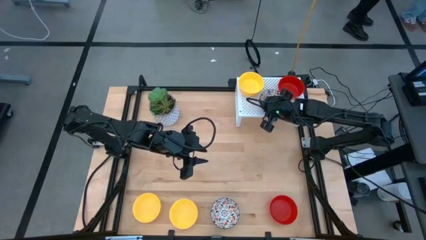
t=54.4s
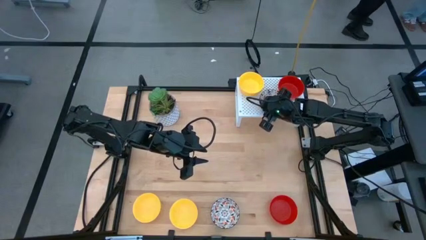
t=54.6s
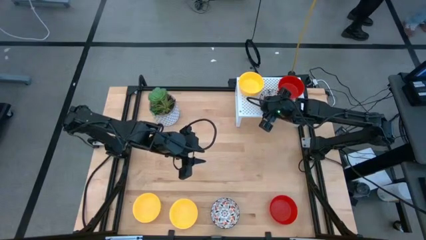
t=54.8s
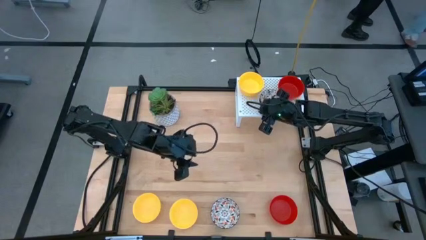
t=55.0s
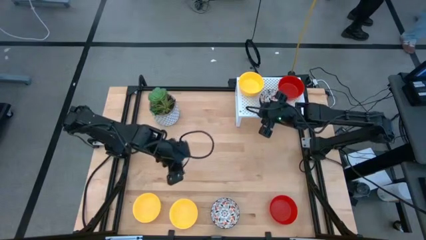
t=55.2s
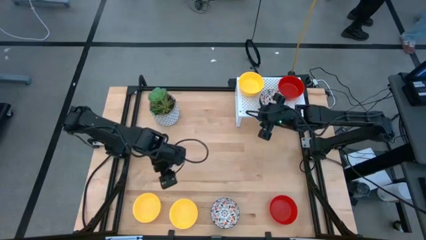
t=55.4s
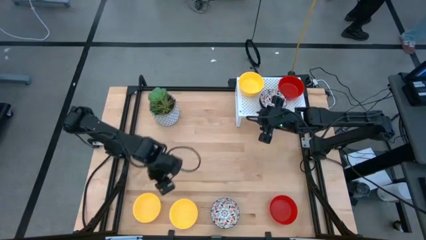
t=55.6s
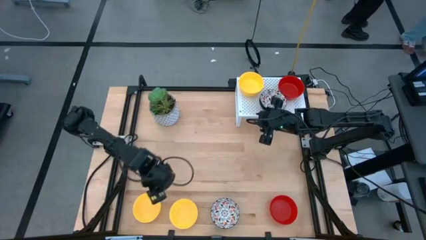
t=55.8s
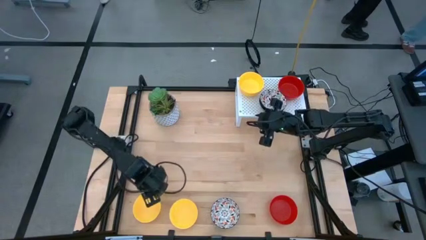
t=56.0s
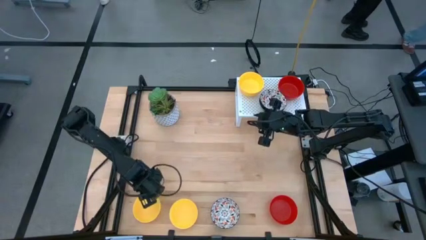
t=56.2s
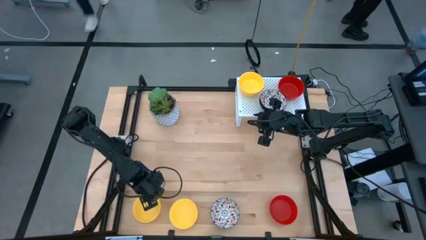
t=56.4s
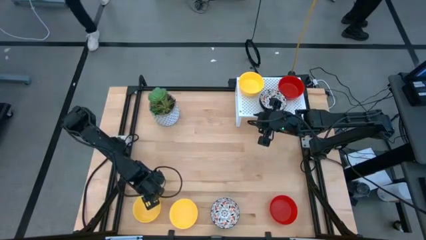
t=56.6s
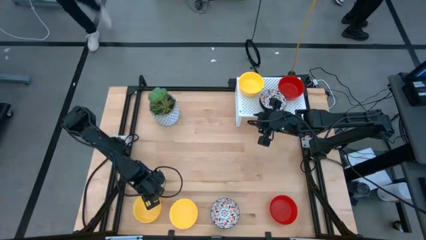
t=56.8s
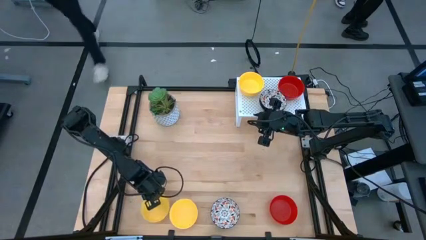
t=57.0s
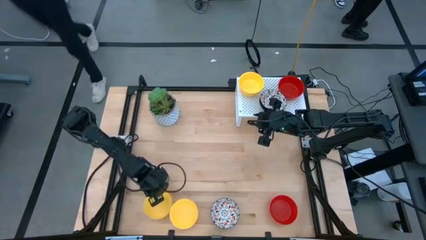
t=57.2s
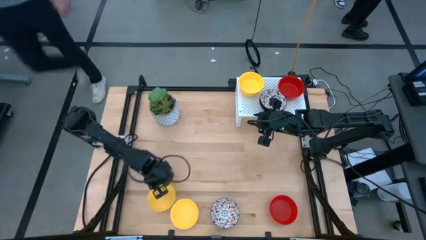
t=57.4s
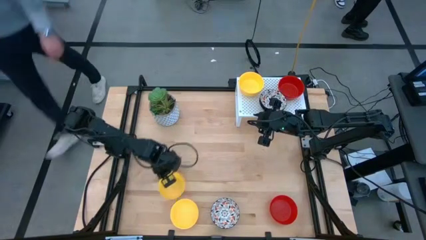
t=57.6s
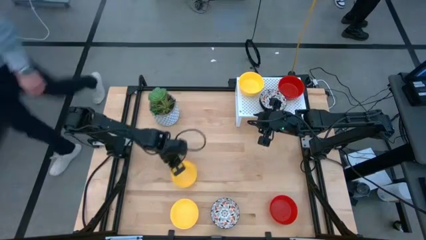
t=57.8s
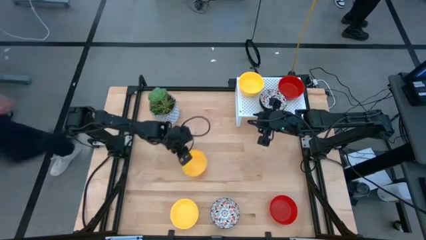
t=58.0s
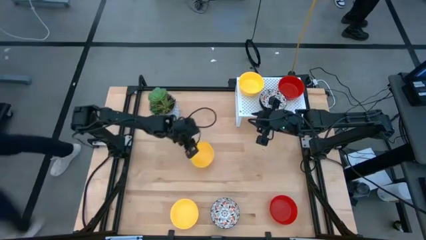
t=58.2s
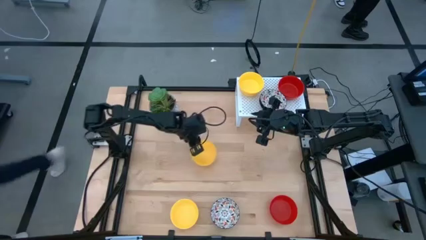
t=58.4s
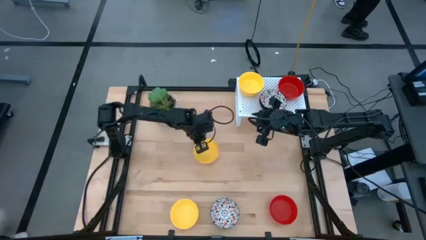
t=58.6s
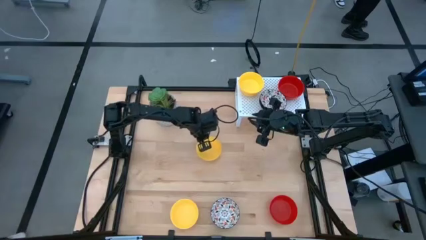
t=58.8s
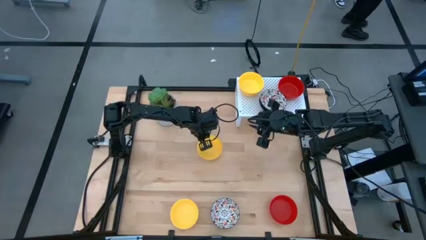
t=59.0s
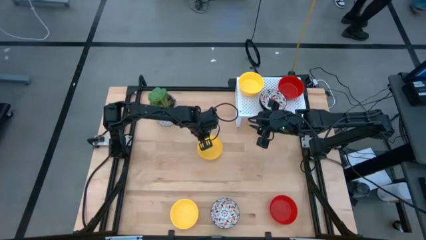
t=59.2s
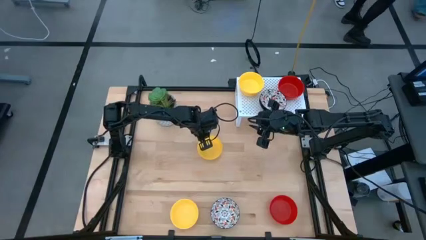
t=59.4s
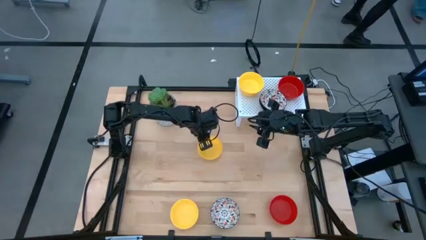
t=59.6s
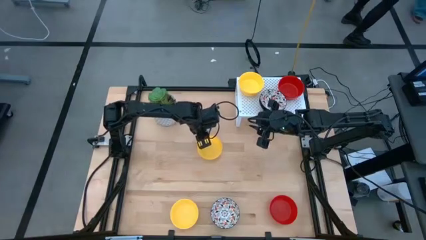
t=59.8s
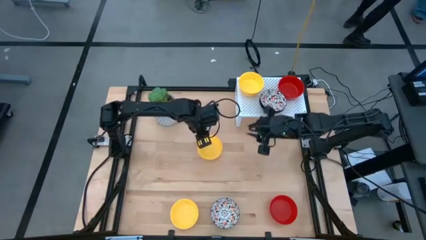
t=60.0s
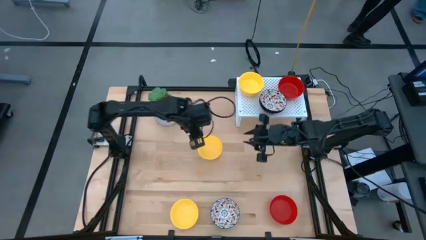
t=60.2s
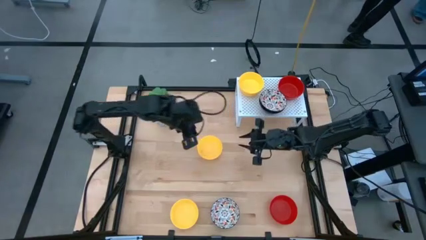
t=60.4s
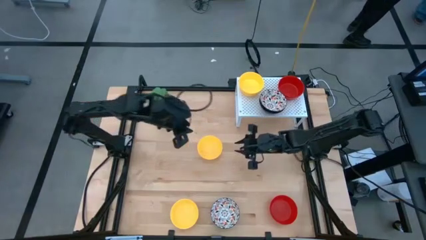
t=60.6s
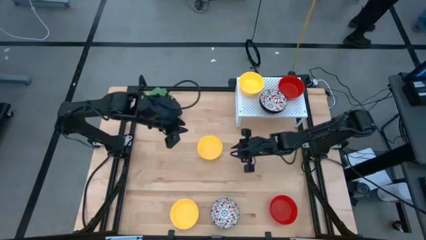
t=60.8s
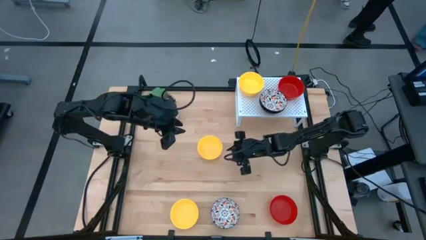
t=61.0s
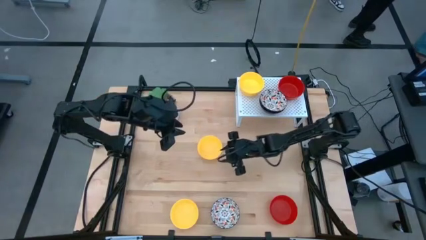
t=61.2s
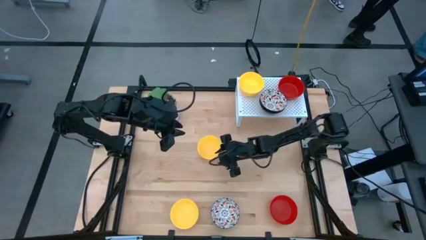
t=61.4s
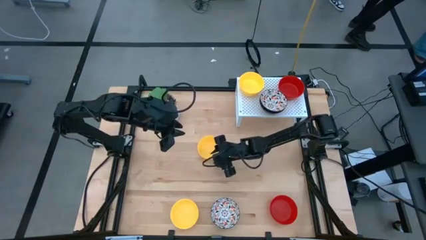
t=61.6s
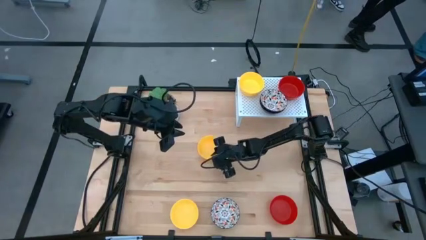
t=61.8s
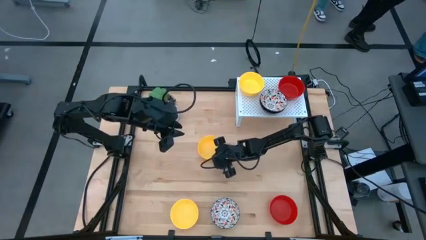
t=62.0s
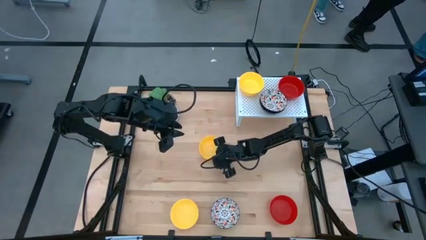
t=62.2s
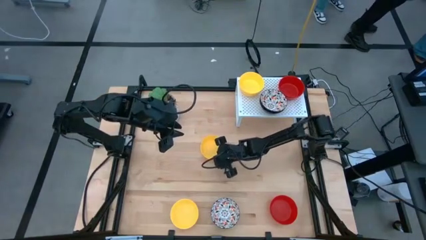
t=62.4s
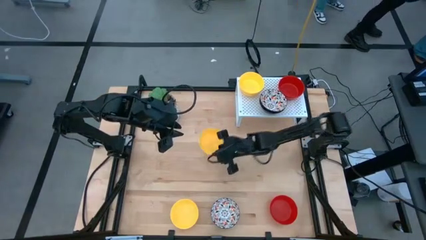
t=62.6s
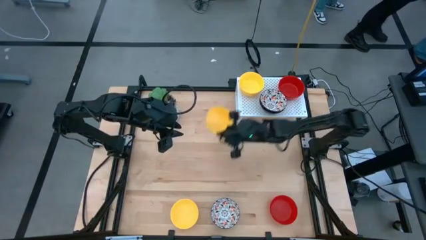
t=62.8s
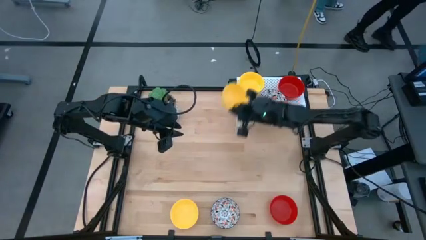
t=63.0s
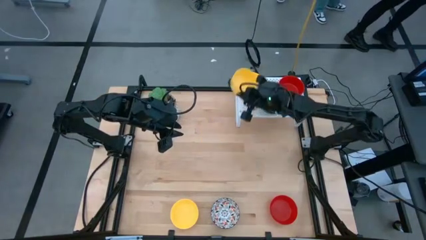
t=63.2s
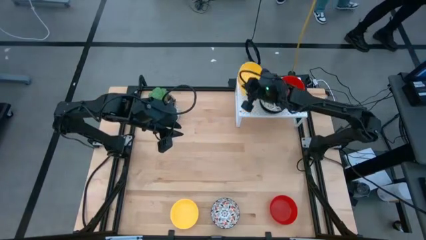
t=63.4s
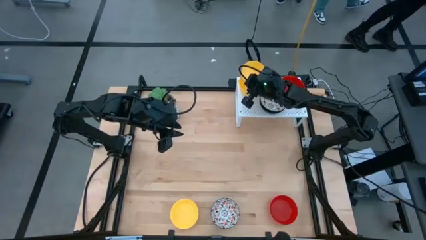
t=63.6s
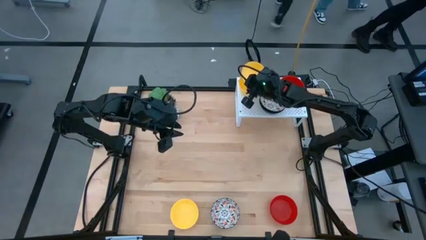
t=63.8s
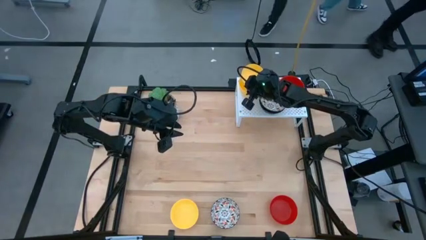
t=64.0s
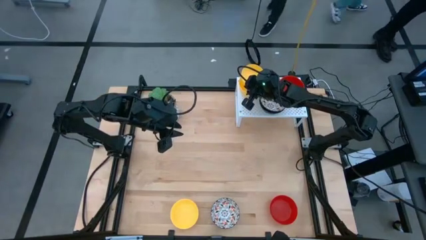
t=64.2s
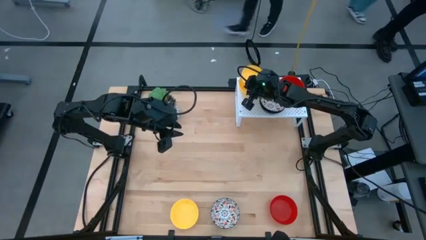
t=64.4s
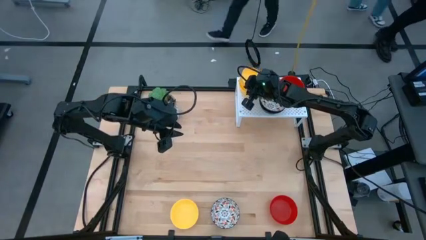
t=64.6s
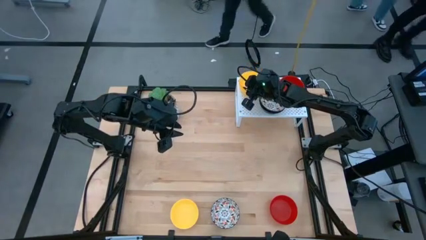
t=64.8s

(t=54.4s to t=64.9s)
Task: Pick & Place Mini bowls
Stack the left yellow bowl on top of the yellow bowl on the shelf

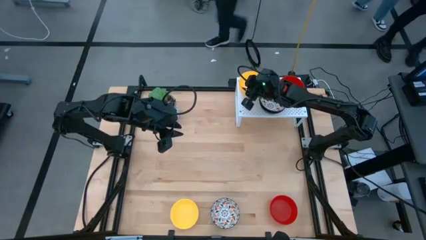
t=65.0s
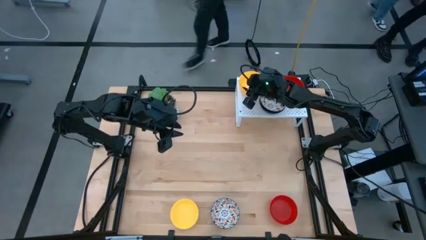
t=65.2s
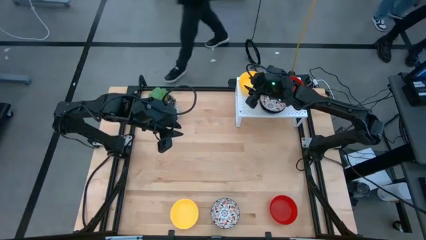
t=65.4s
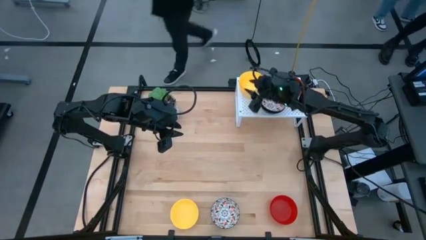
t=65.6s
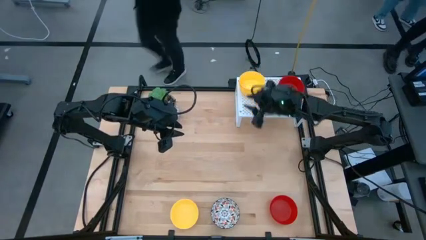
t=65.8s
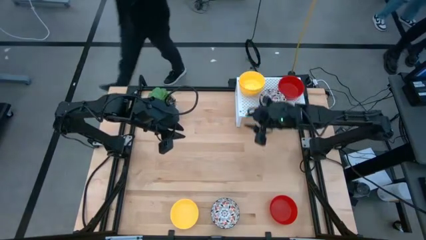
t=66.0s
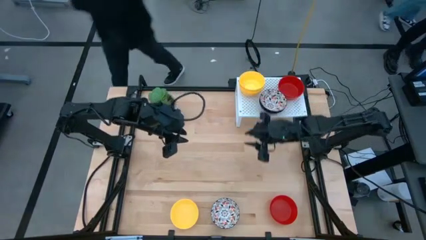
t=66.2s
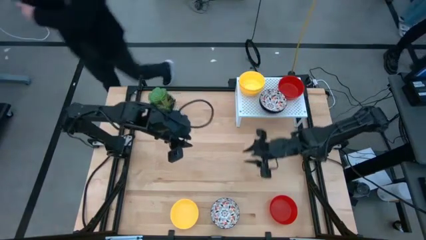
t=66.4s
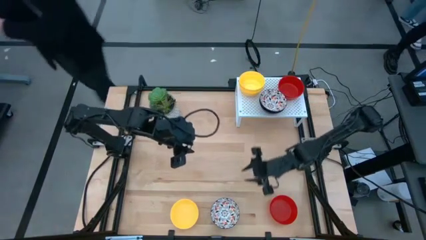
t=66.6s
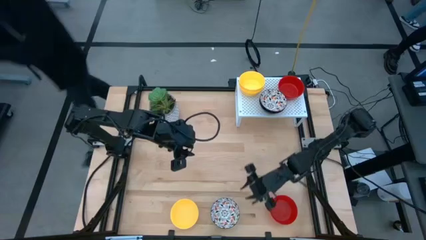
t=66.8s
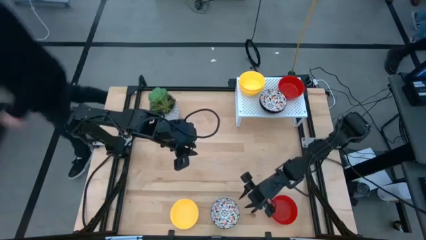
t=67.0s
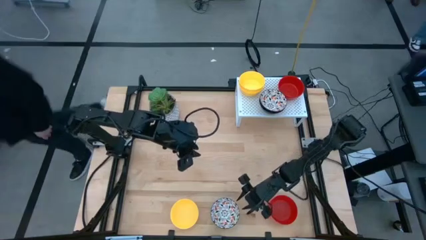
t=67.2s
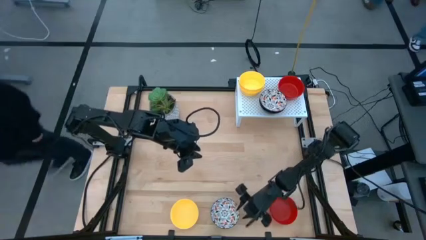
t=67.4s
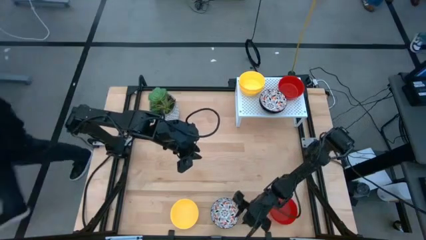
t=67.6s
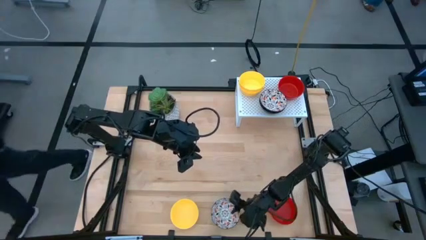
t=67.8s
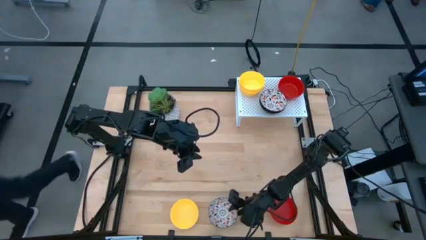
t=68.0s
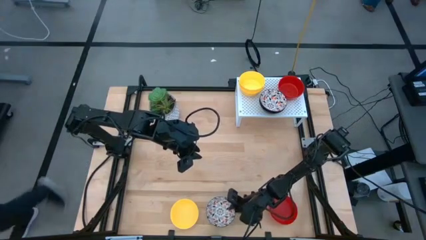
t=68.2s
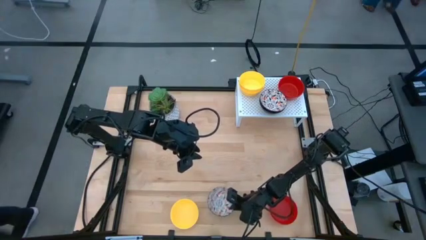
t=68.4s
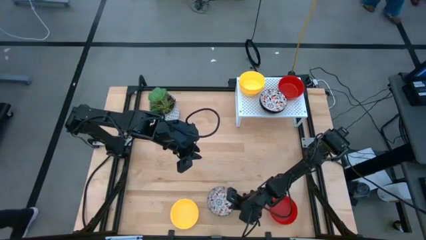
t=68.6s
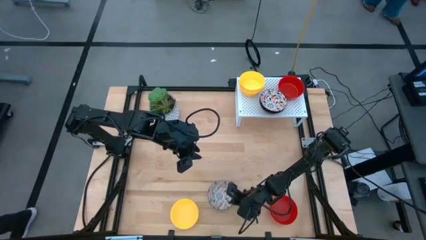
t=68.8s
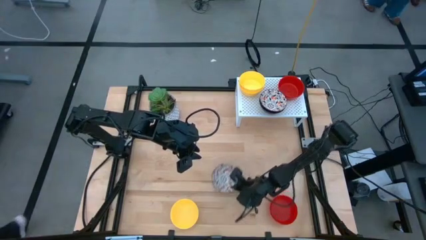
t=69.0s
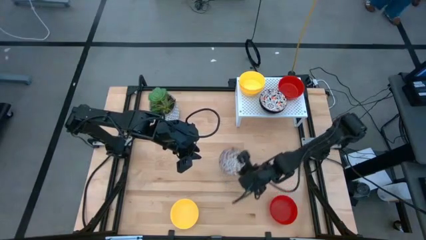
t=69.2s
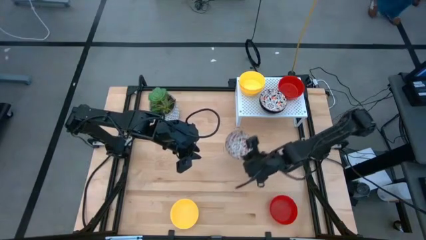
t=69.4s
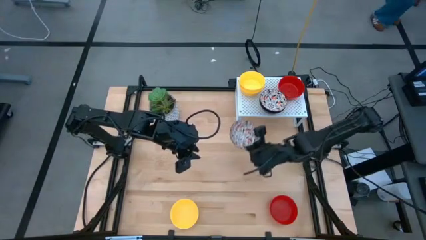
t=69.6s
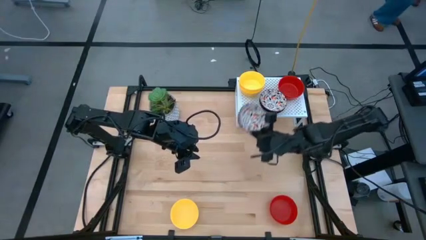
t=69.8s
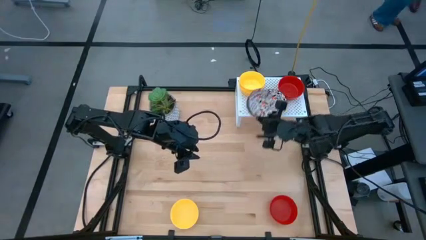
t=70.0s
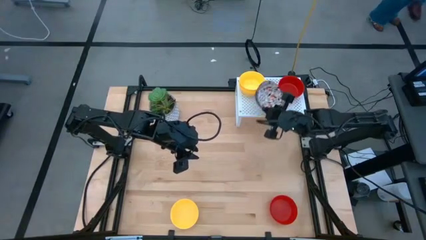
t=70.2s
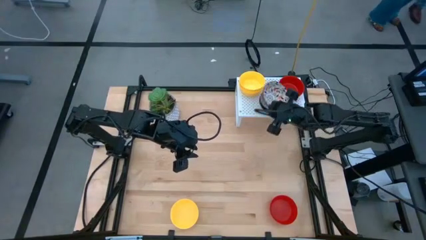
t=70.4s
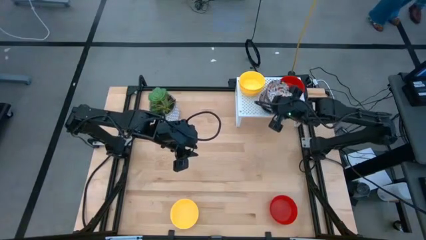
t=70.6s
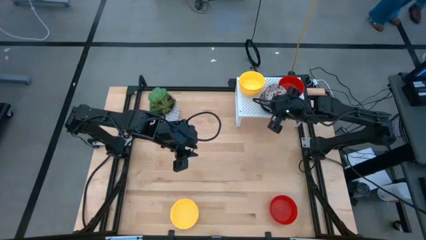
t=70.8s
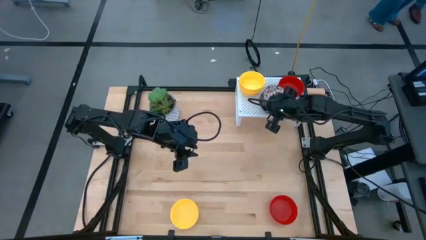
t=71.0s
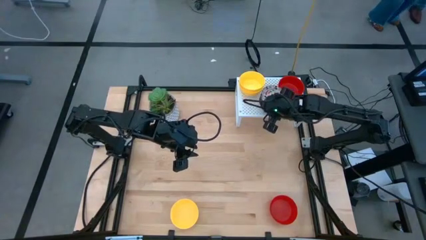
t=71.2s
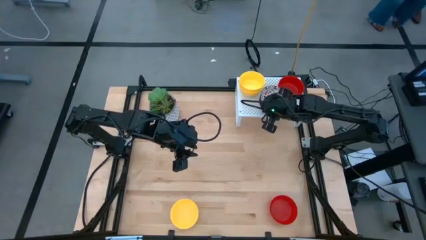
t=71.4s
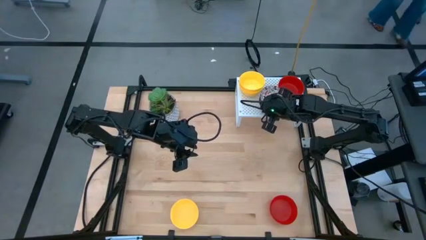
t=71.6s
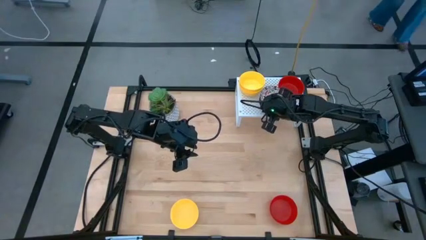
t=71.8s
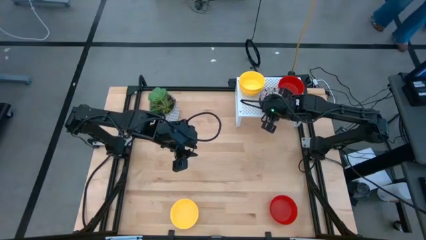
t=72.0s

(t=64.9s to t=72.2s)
Stack the white patterned bowl on top of the white patterned bowl on the shelf
